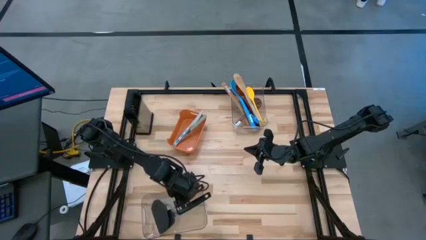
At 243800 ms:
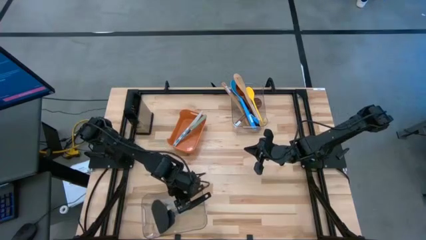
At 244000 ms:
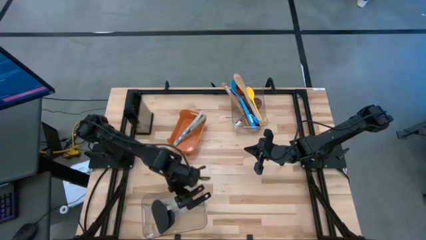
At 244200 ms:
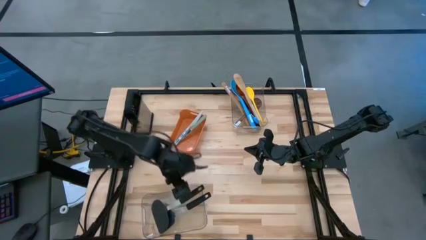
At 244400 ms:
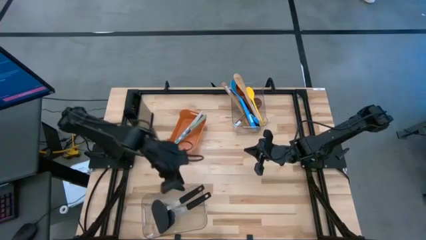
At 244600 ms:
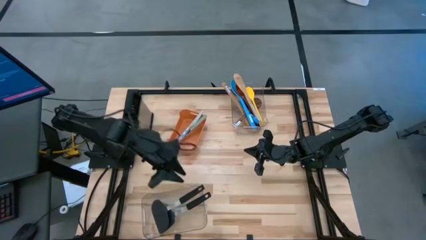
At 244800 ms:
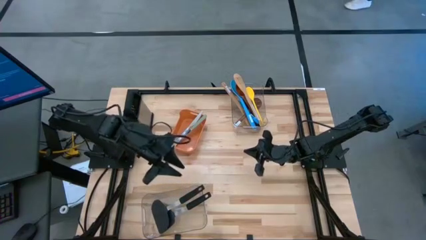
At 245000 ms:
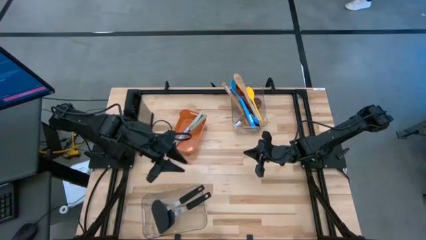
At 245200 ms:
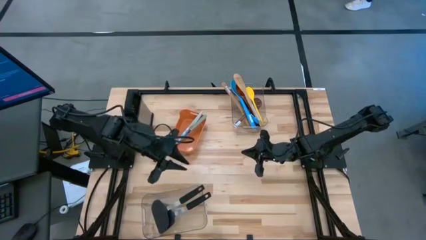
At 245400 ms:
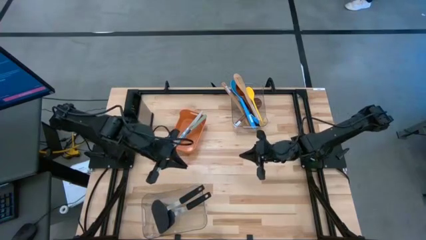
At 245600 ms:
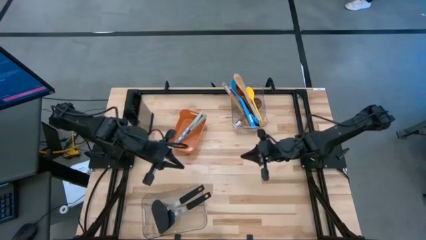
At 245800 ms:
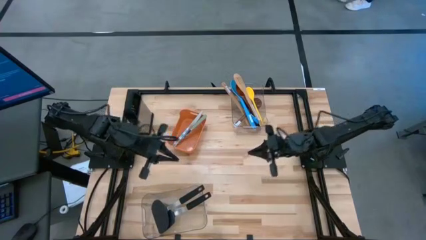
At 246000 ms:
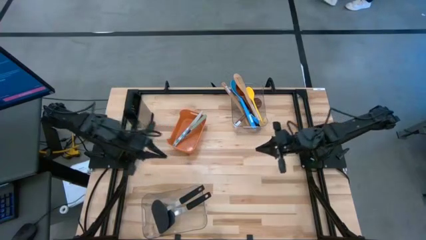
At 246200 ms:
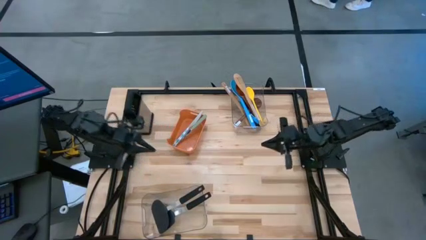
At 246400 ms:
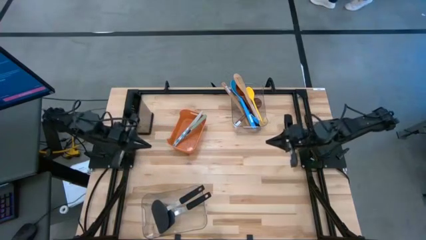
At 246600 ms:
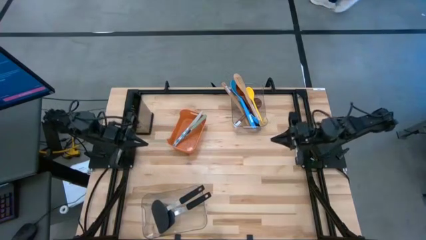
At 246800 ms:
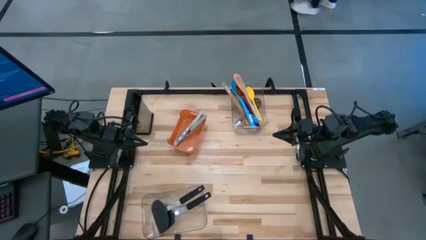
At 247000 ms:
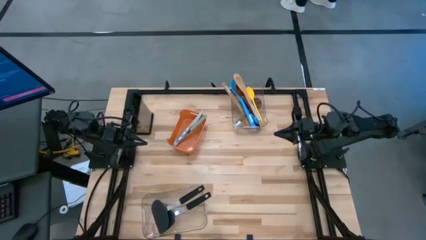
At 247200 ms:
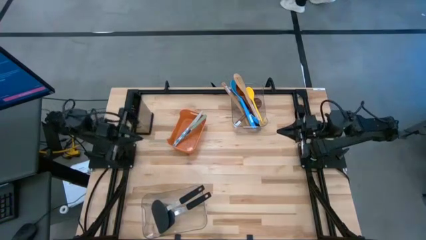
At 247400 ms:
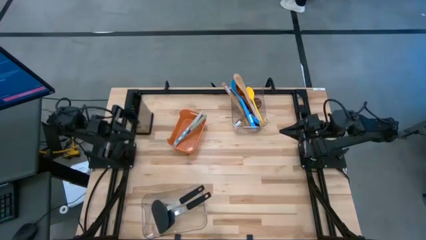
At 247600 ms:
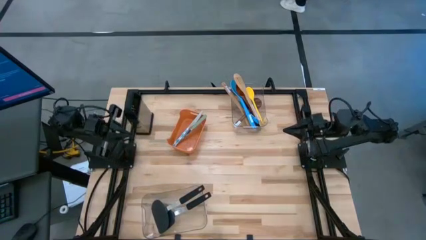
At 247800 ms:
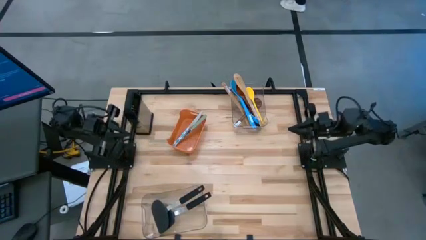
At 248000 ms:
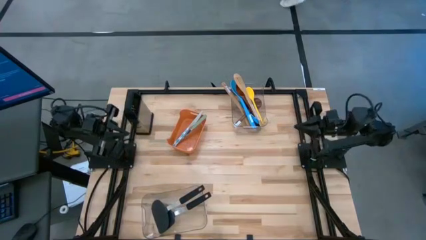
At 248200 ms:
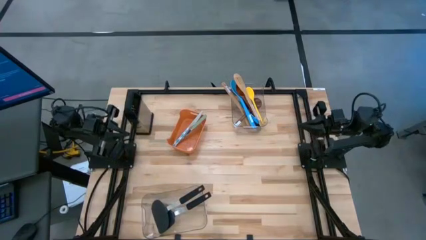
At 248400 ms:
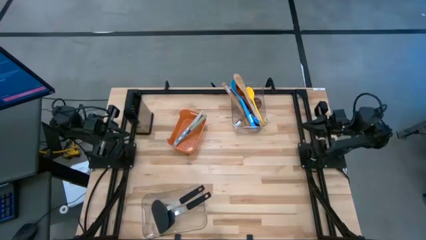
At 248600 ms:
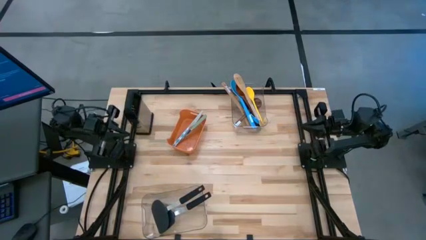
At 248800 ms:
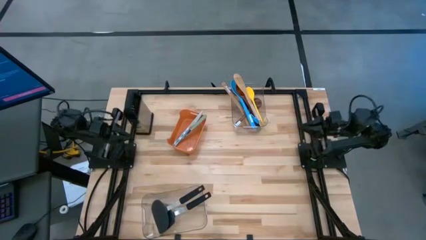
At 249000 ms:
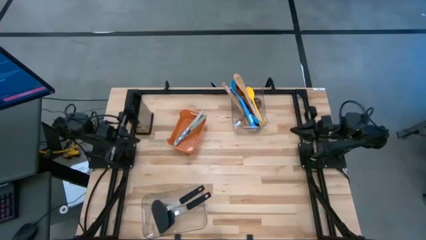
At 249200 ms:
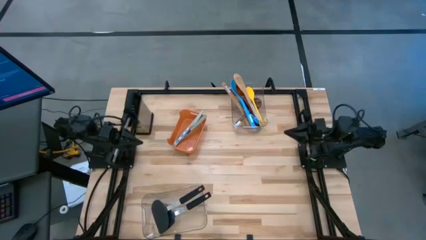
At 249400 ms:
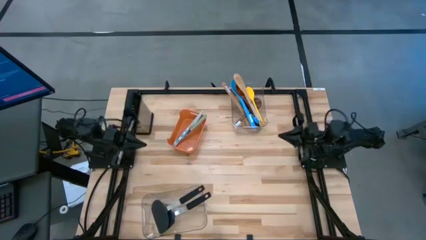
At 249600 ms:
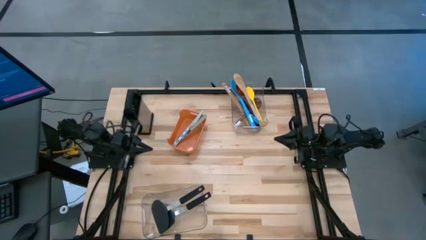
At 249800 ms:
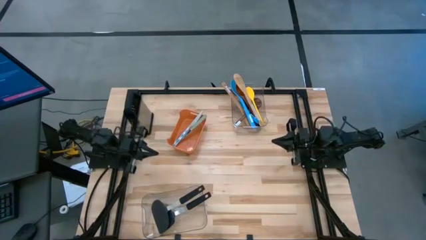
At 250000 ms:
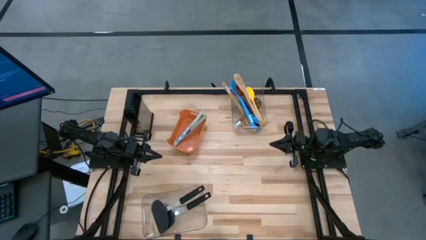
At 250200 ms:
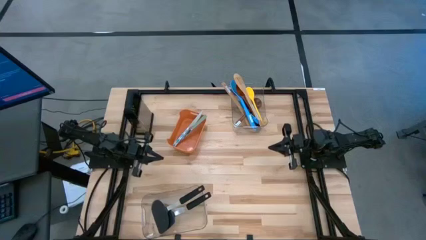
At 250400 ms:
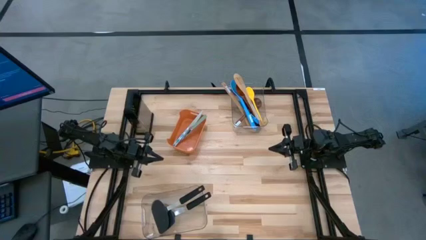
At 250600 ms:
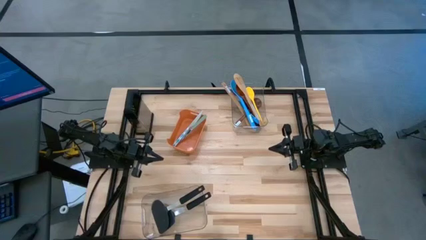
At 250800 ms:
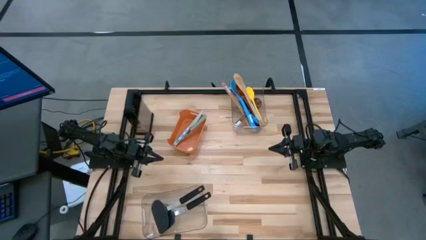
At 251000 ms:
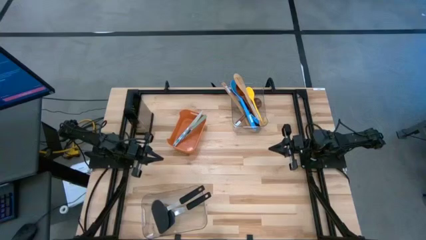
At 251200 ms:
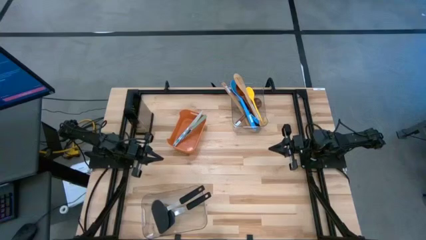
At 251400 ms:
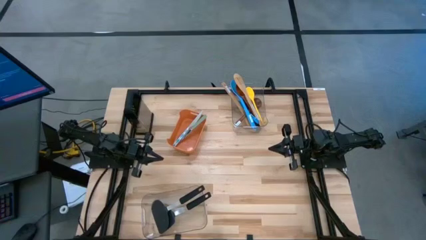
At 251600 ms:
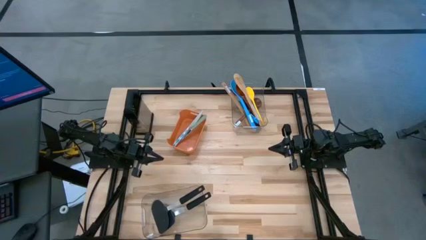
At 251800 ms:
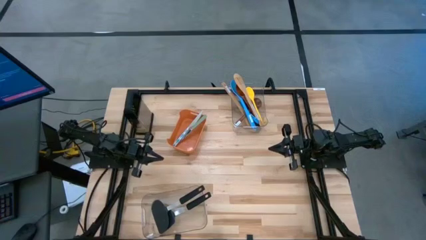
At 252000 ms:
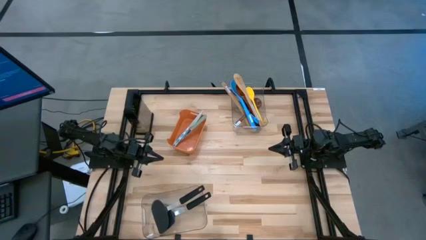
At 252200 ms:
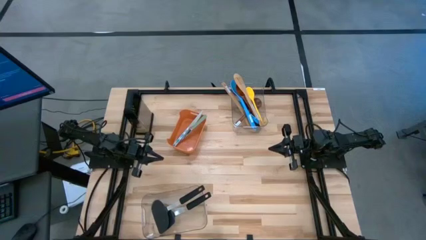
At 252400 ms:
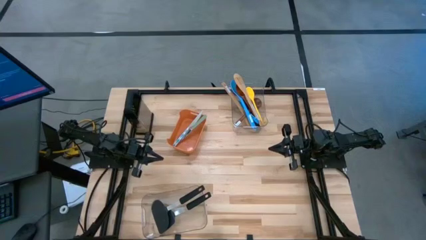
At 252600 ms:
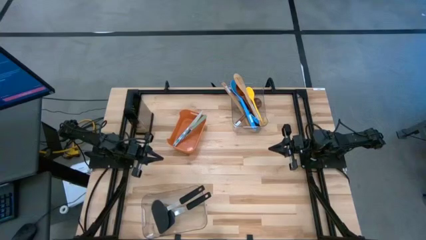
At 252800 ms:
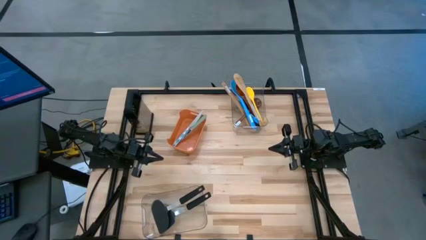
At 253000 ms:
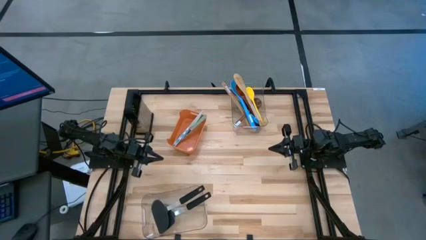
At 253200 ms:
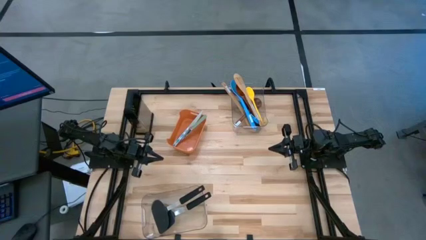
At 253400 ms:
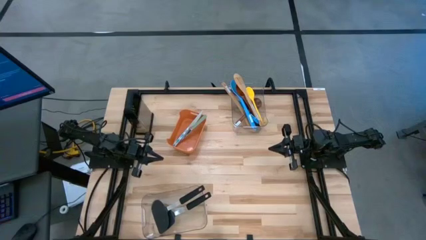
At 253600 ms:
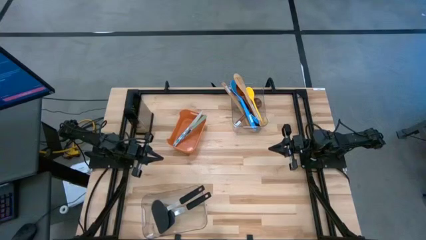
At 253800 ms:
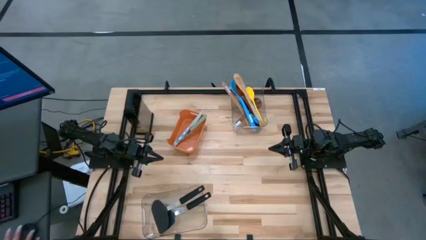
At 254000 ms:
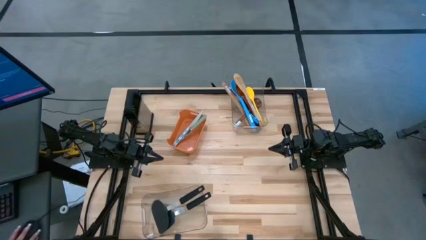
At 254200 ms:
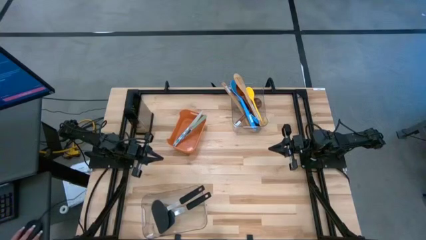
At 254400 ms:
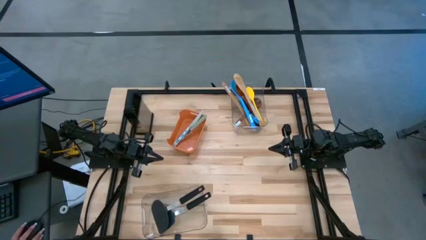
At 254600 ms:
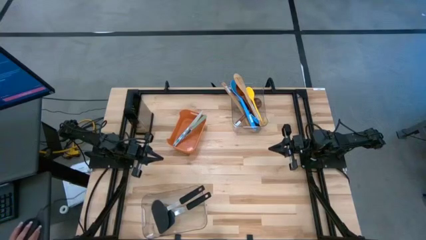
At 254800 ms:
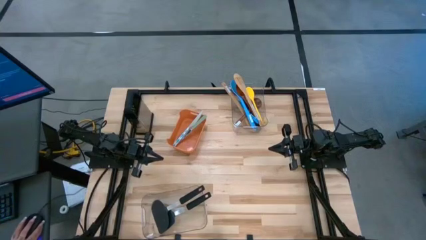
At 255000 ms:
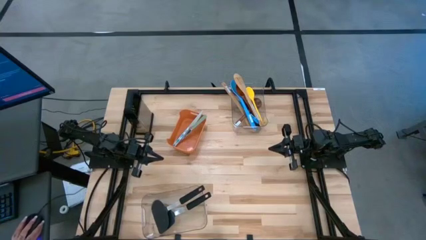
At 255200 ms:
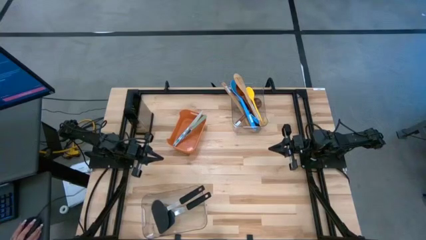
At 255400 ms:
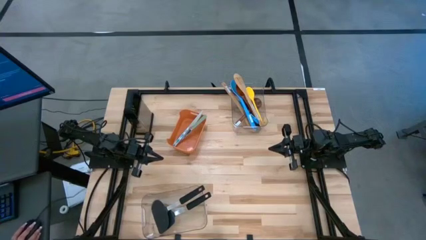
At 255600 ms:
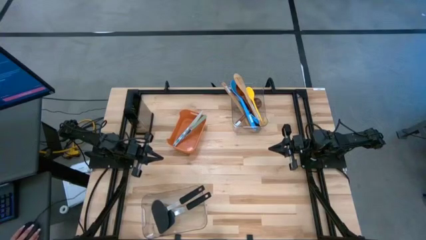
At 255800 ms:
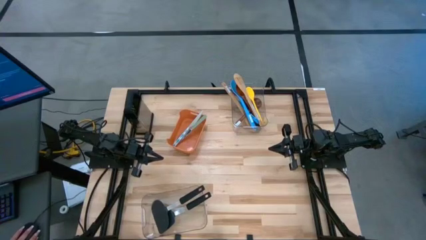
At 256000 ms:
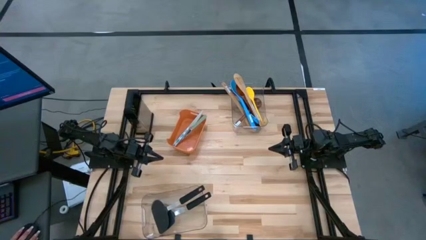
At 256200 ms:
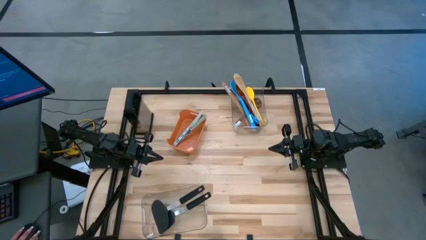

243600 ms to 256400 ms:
Task: Pick & Place Kitchen Items
Return to Home Position
